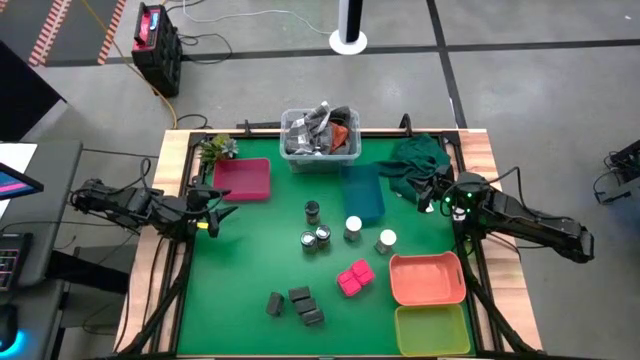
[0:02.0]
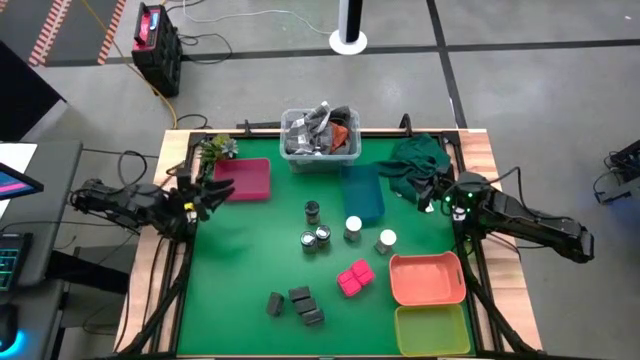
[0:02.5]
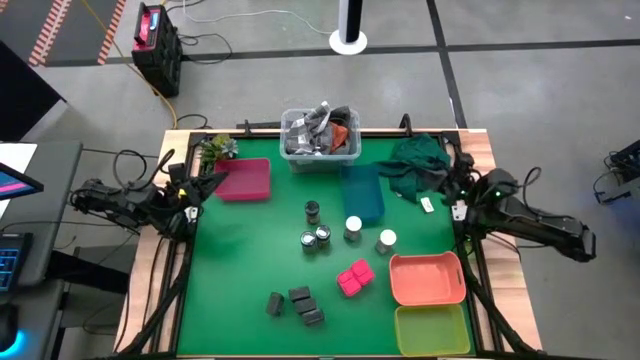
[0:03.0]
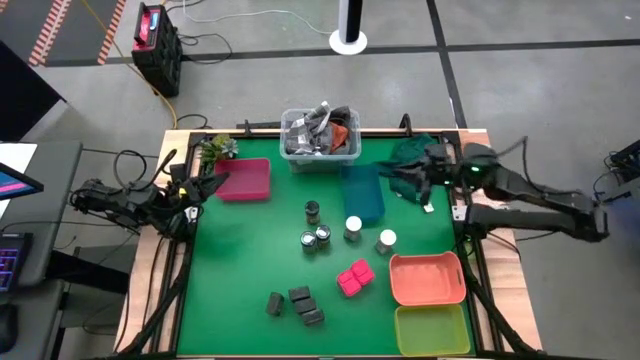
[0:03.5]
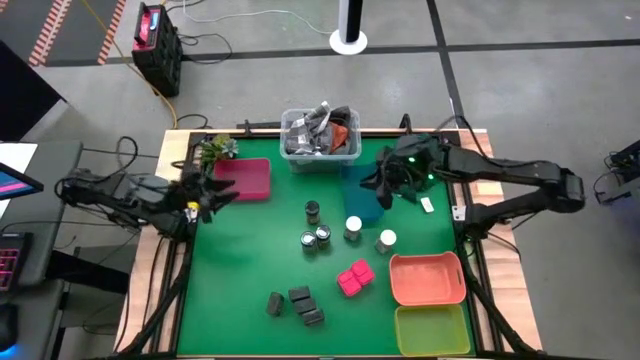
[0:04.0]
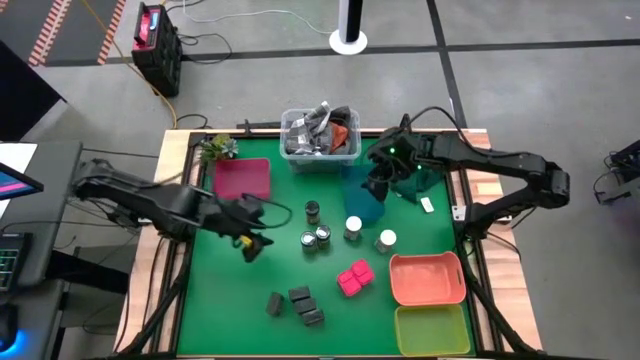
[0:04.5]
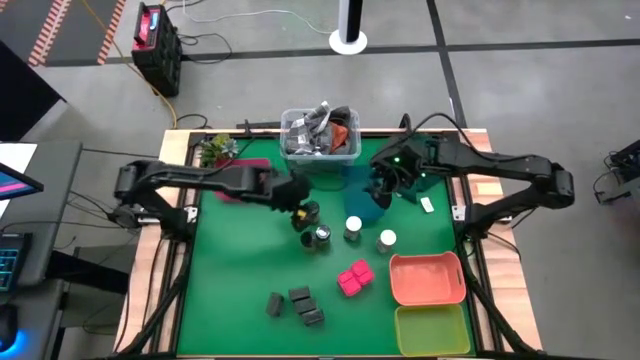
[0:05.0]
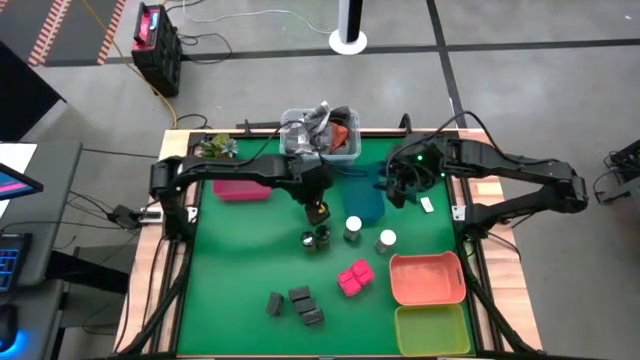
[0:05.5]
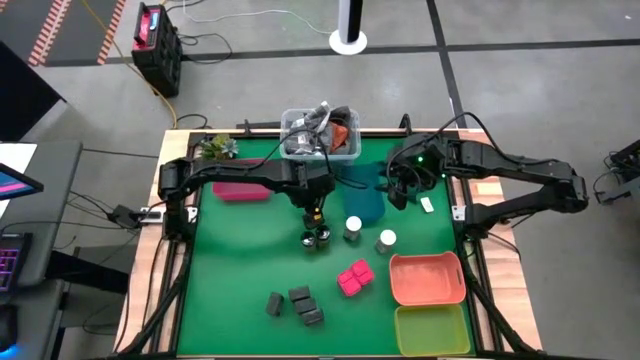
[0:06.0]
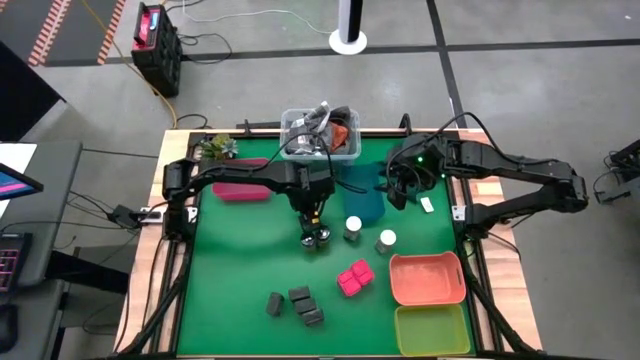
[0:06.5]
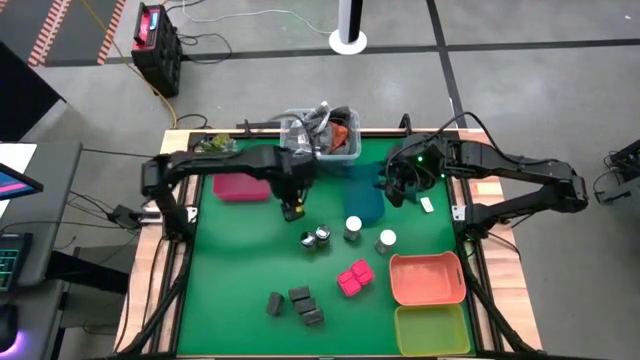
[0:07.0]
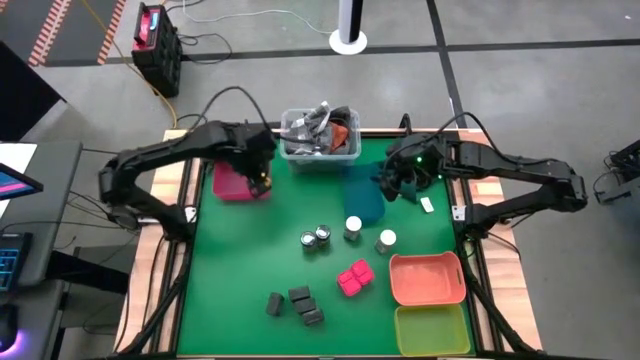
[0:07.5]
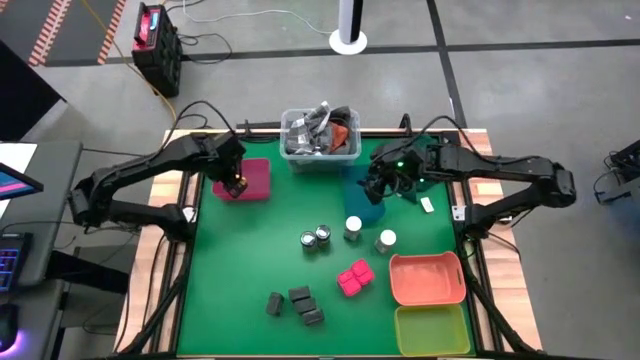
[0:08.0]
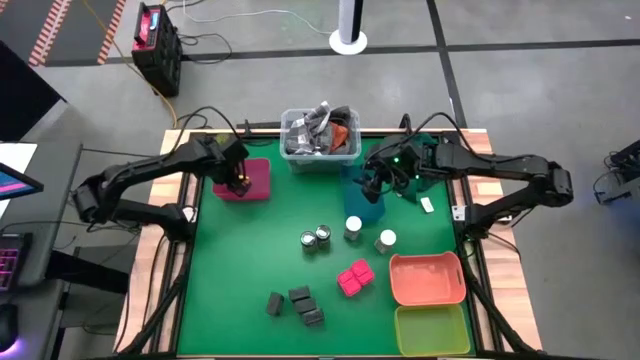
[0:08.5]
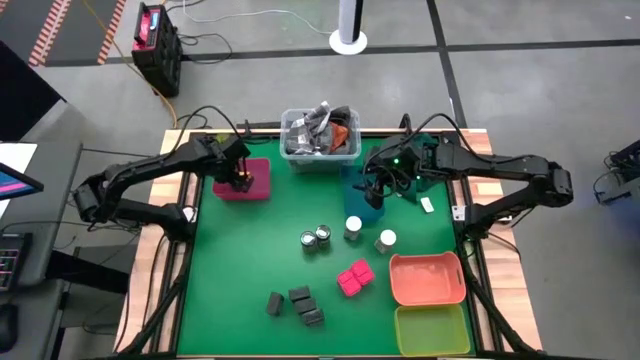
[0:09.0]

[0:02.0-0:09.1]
Task: Sort spices by type
Put the black seasoning bottle into the pink bin

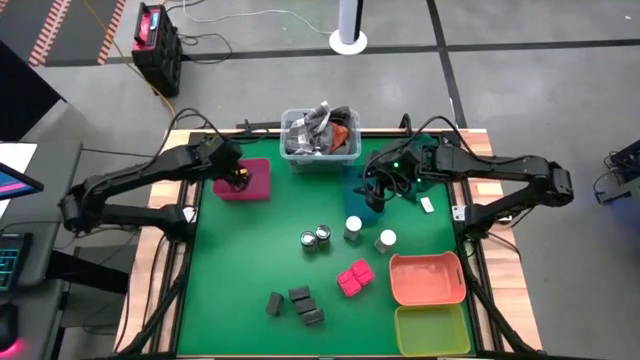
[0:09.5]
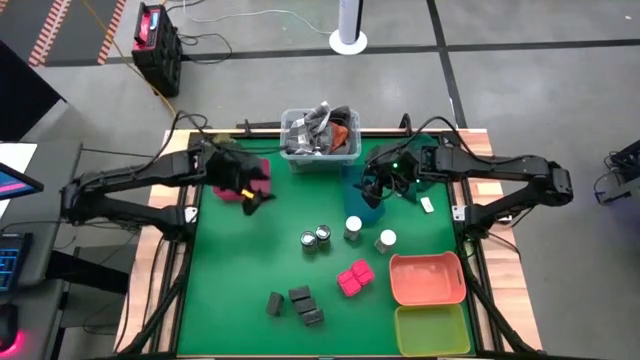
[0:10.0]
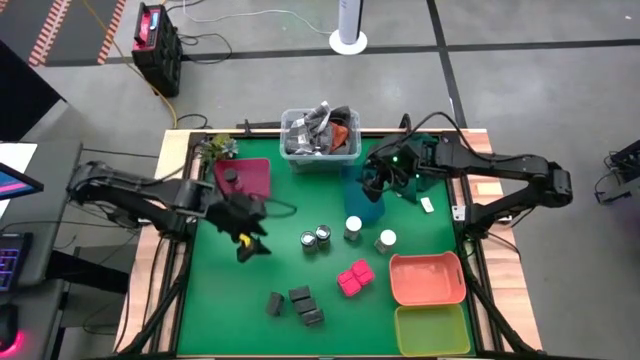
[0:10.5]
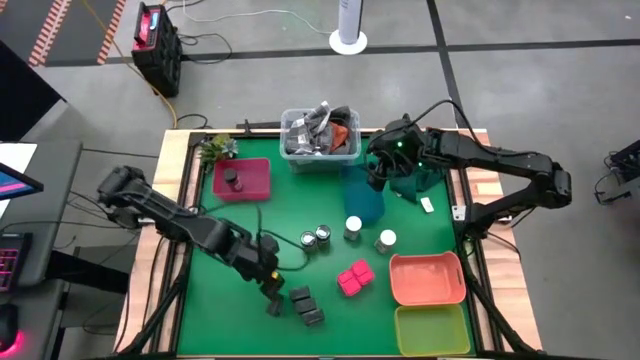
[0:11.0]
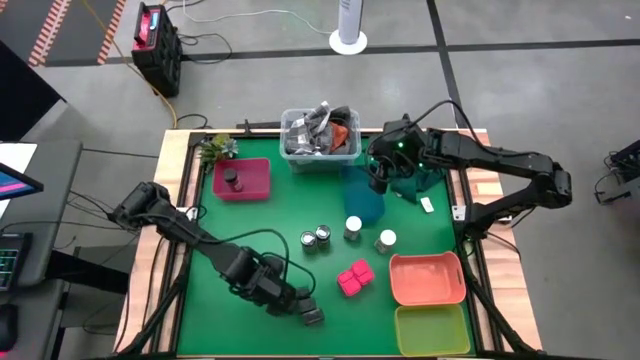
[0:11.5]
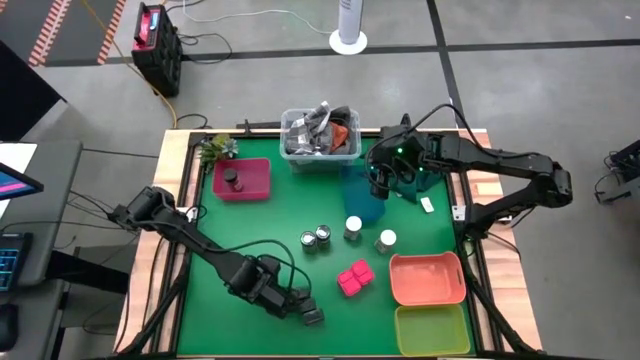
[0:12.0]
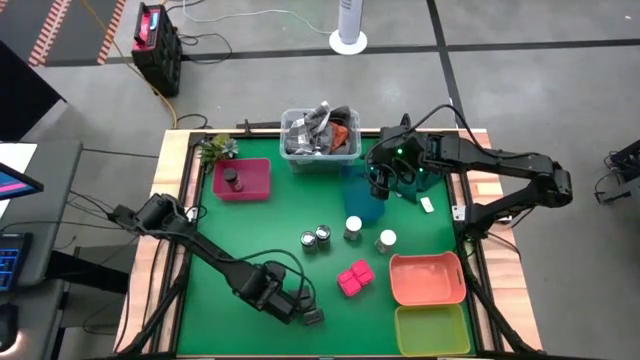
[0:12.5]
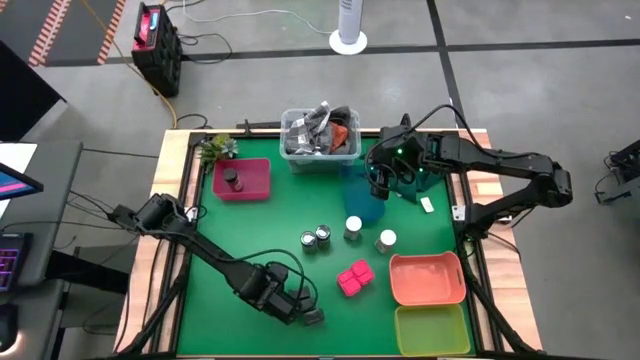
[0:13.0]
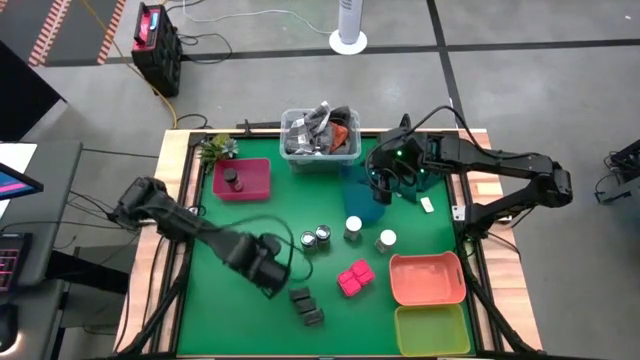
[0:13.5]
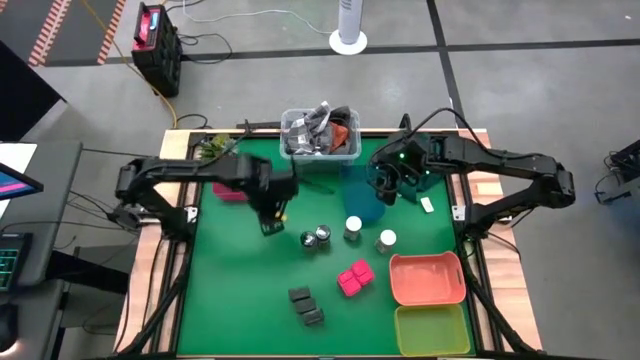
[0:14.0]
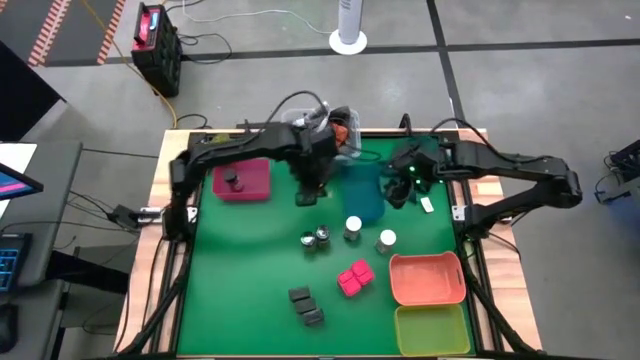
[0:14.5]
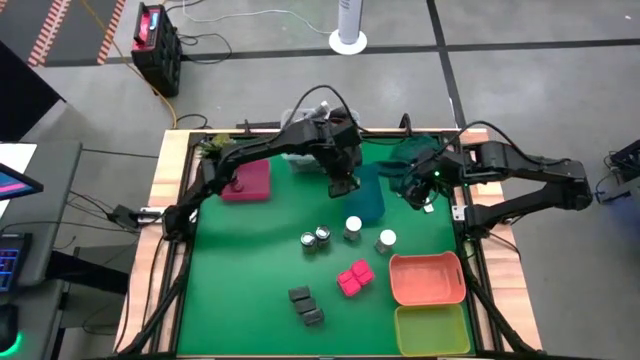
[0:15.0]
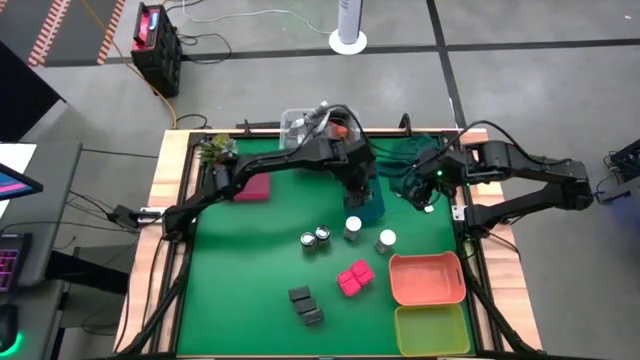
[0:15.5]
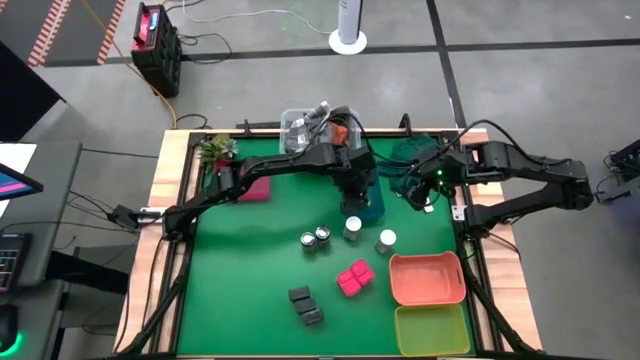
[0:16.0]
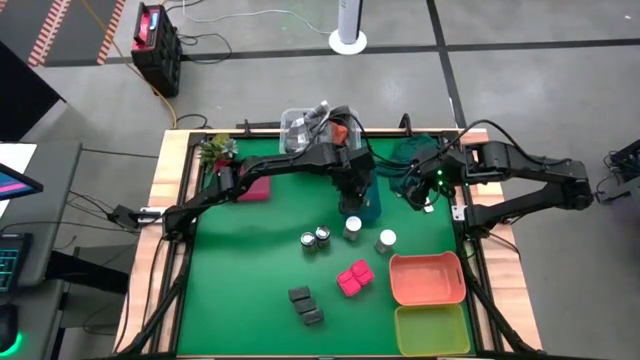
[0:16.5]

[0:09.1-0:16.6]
Put the black seasoning can into the blue bin

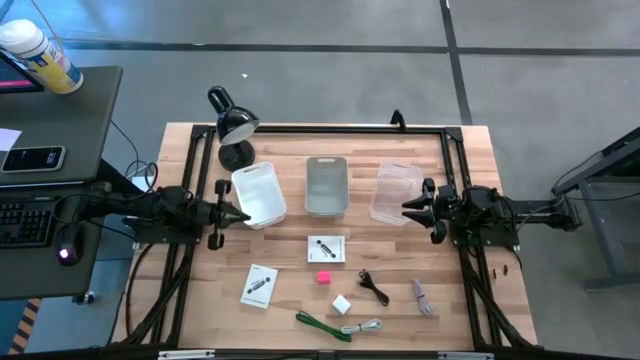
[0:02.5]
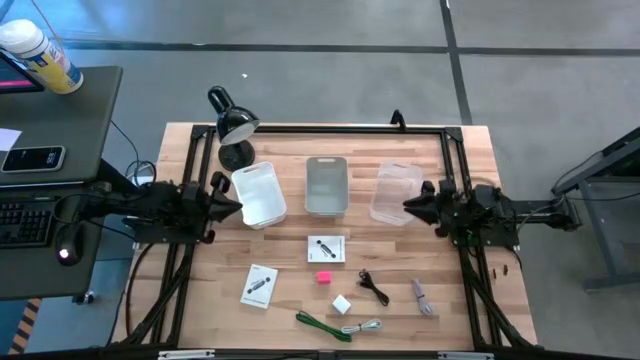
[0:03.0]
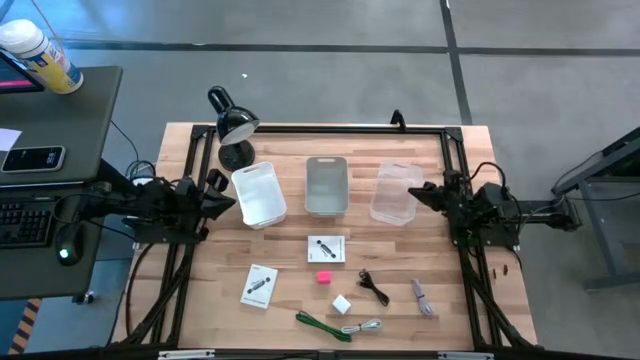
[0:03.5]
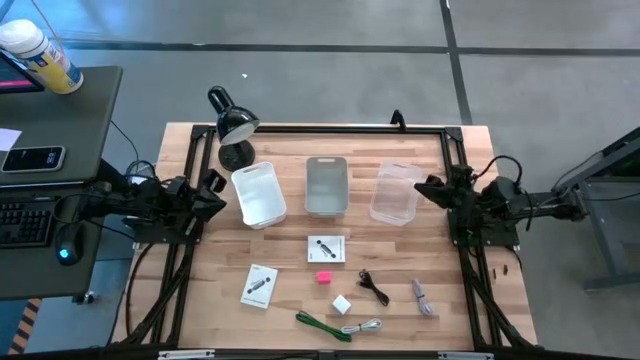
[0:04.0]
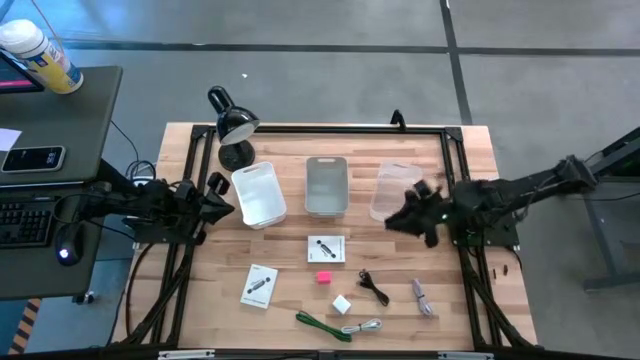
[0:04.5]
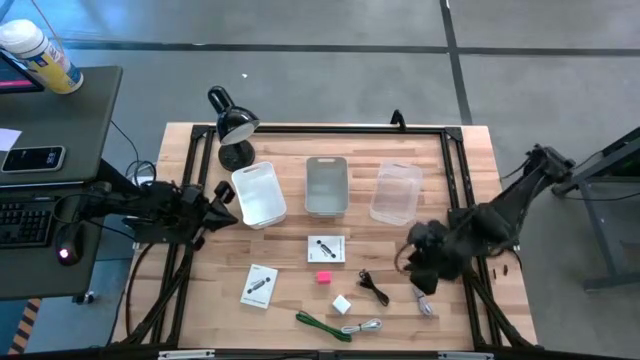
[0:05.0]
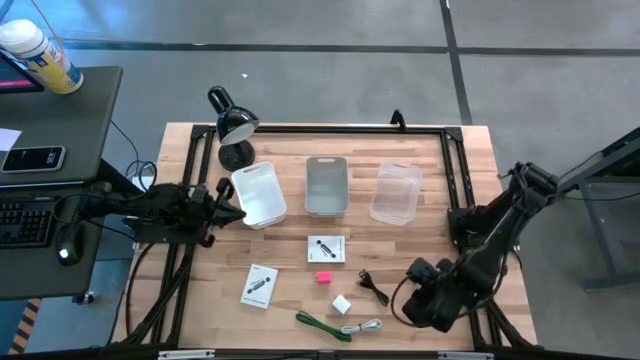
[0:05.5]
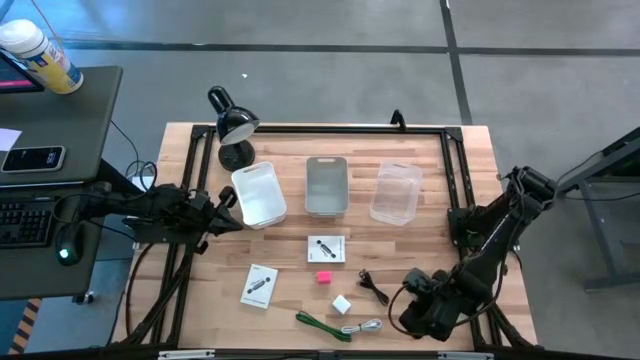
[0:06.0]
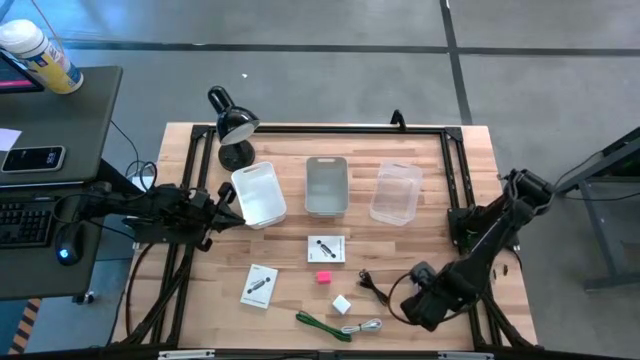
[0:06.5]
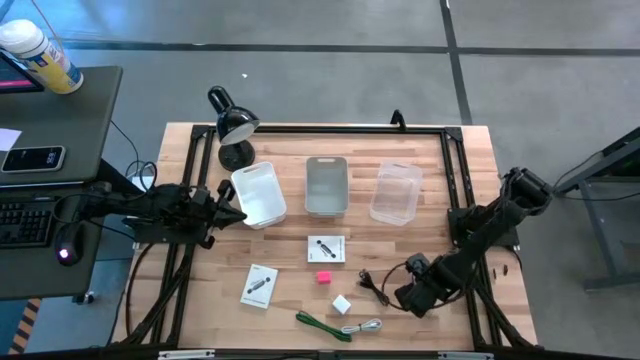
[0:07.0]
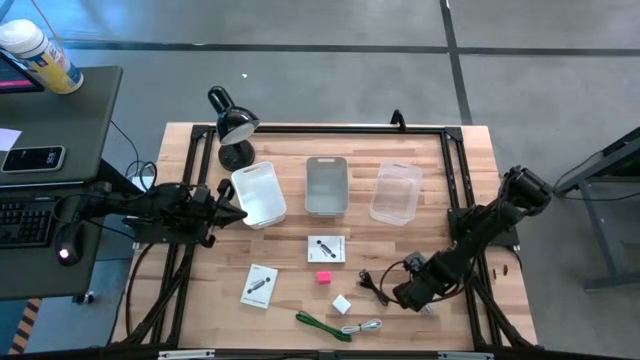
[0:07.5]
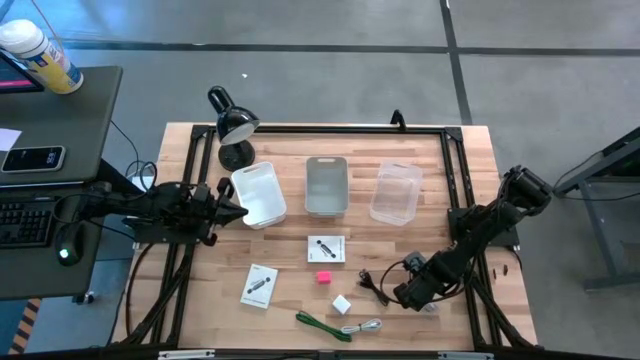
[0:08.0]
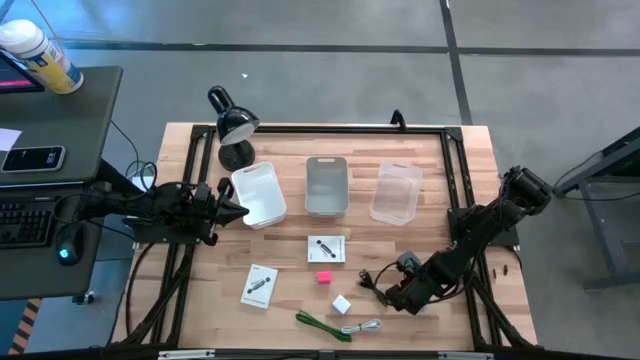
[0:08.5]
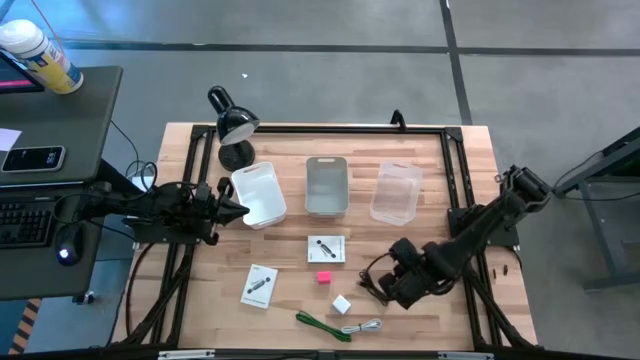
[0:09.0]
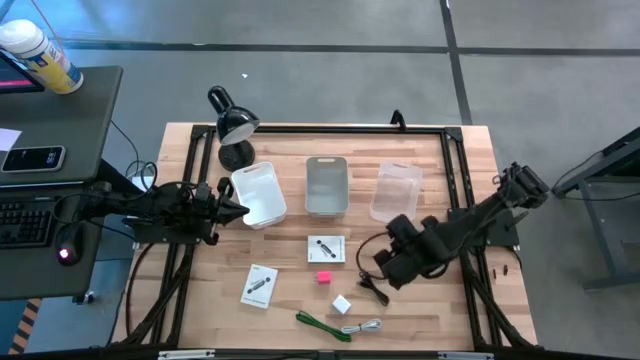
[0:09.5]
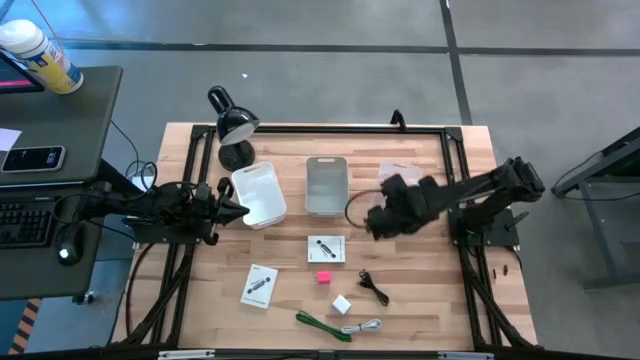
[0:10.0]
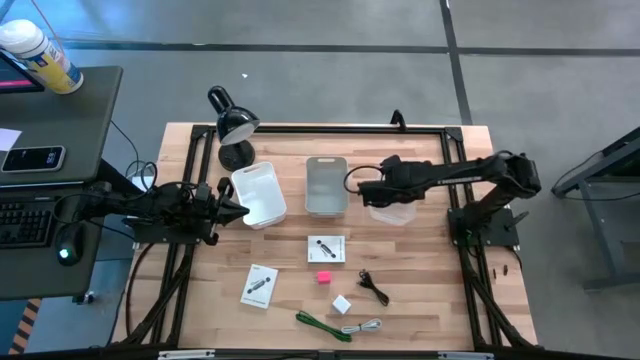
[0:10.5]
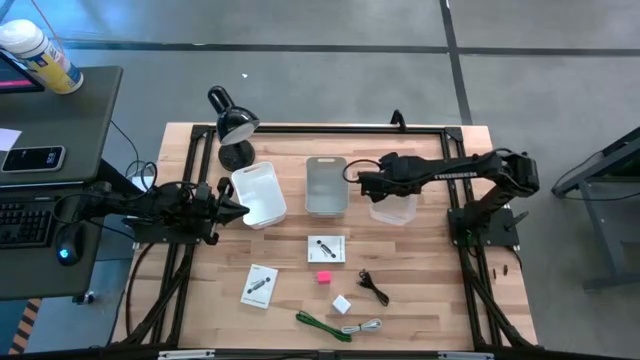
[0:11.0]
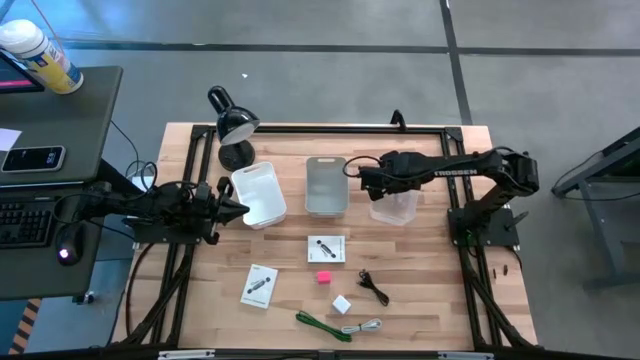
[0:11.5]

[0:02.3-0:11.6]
Task: Pick and place items into bin
Put the light blue charger cable into the transparent bin
